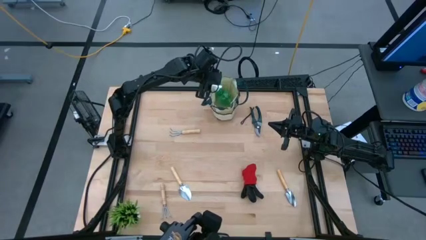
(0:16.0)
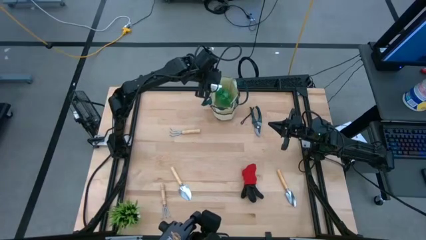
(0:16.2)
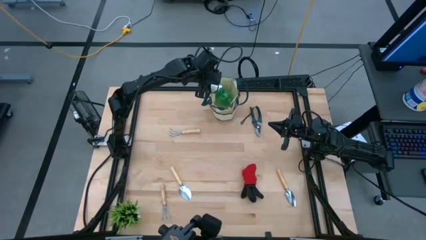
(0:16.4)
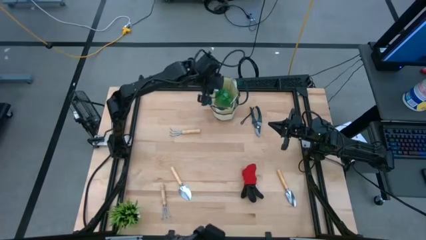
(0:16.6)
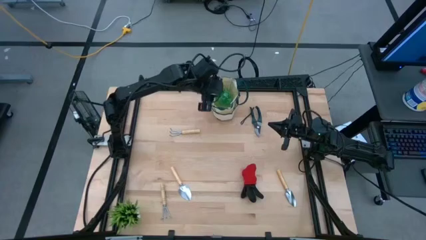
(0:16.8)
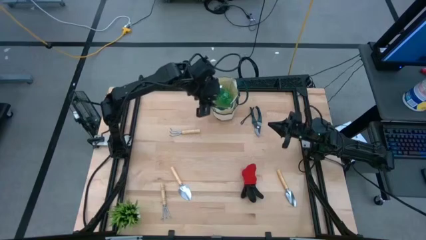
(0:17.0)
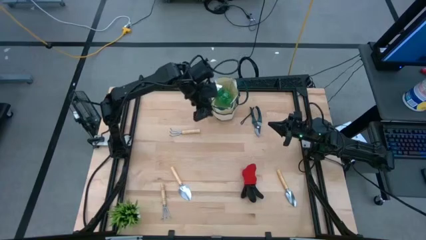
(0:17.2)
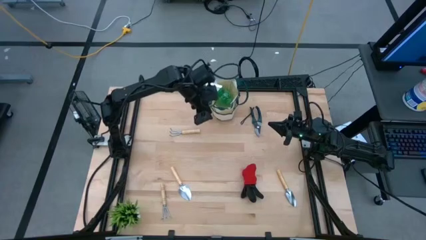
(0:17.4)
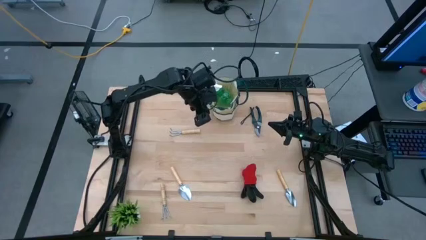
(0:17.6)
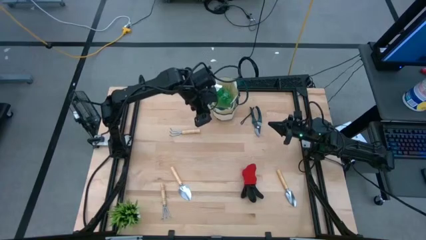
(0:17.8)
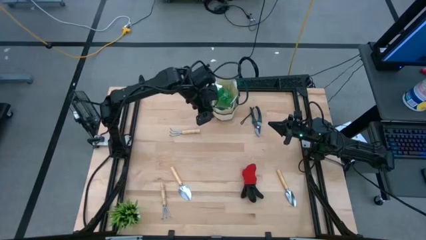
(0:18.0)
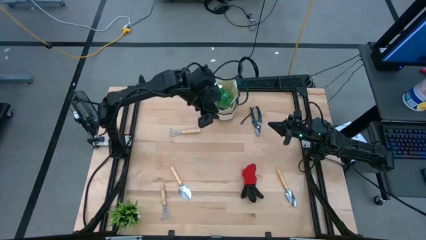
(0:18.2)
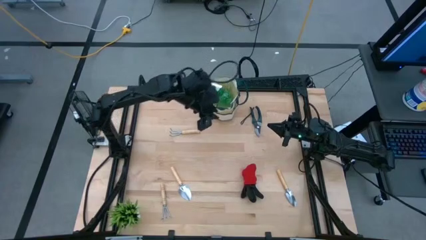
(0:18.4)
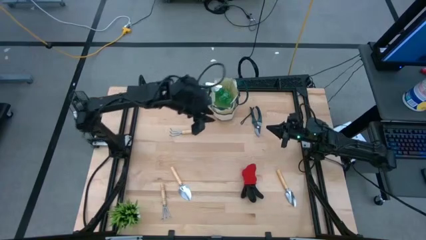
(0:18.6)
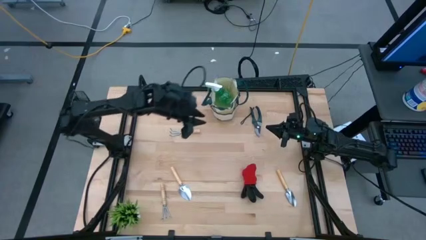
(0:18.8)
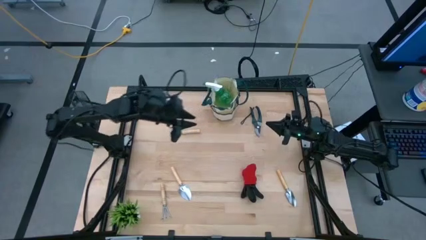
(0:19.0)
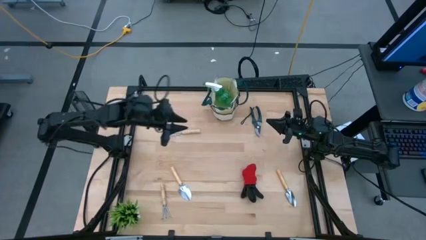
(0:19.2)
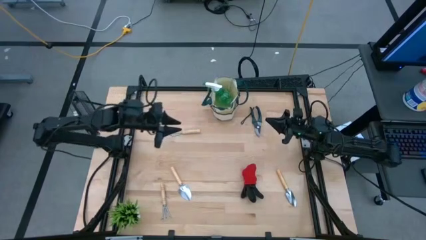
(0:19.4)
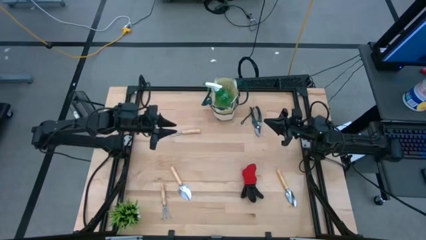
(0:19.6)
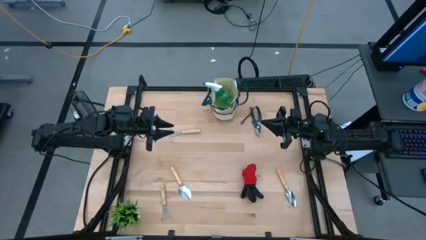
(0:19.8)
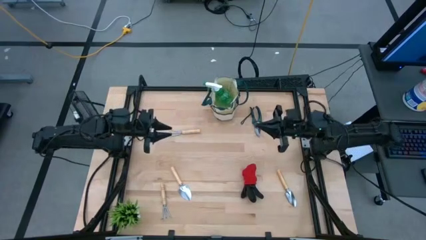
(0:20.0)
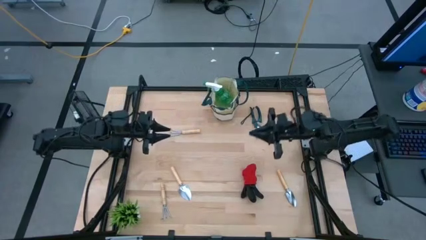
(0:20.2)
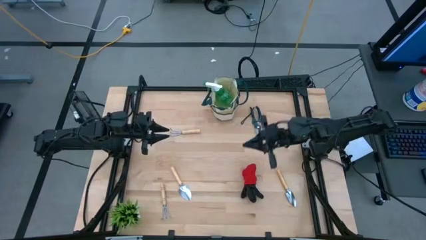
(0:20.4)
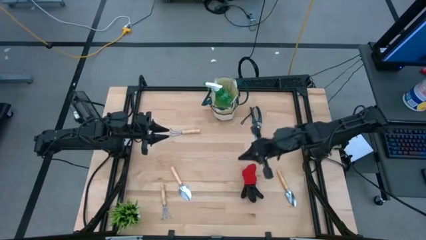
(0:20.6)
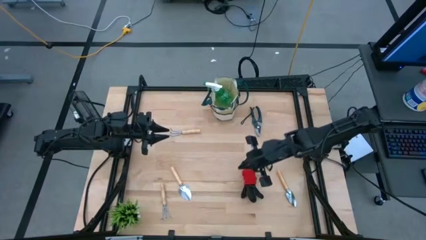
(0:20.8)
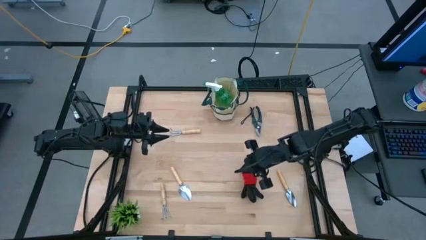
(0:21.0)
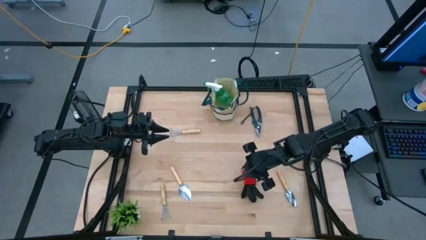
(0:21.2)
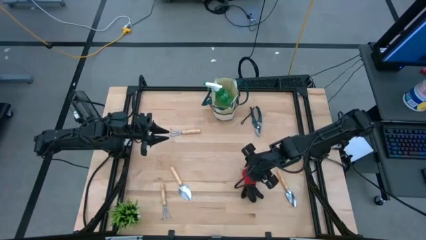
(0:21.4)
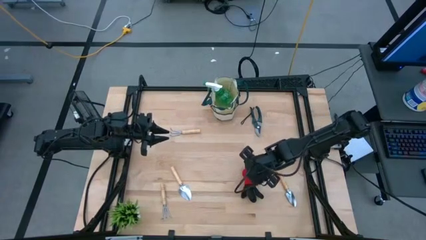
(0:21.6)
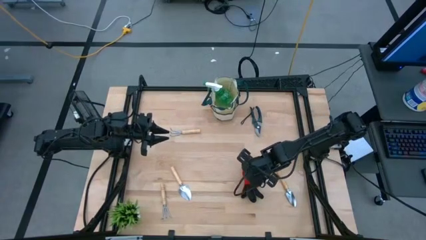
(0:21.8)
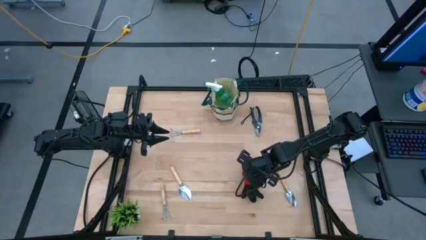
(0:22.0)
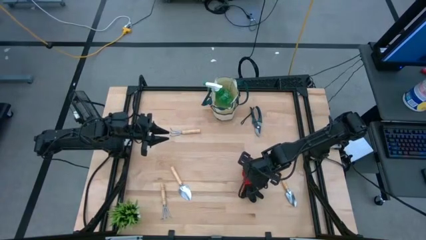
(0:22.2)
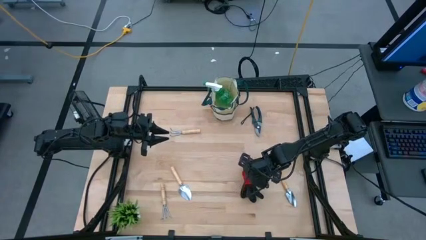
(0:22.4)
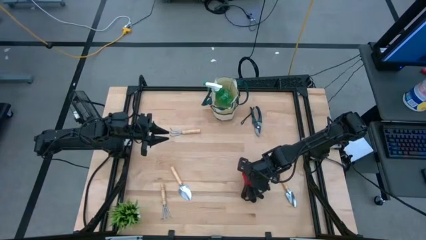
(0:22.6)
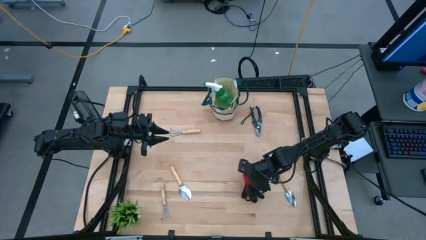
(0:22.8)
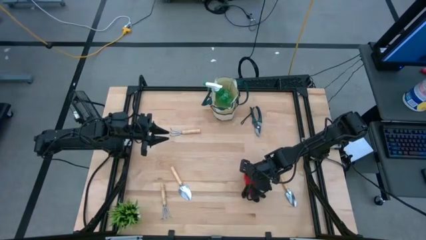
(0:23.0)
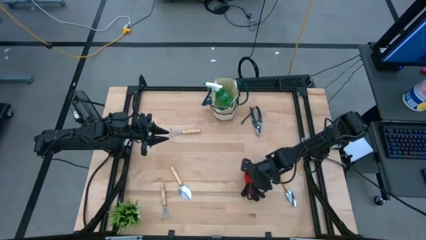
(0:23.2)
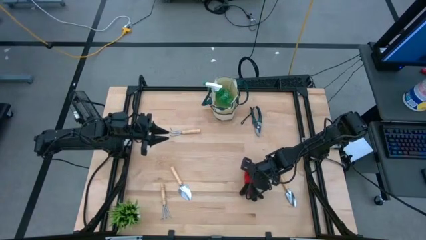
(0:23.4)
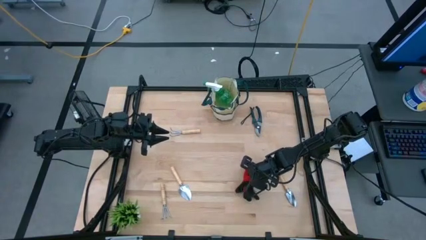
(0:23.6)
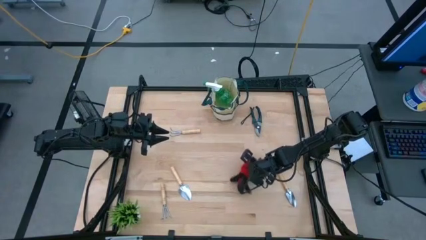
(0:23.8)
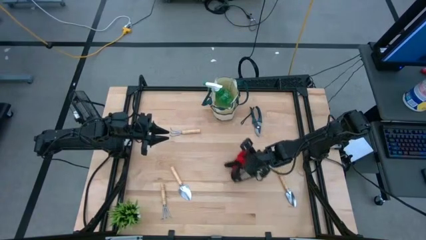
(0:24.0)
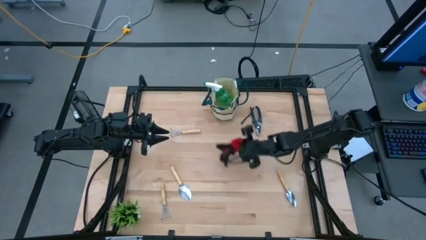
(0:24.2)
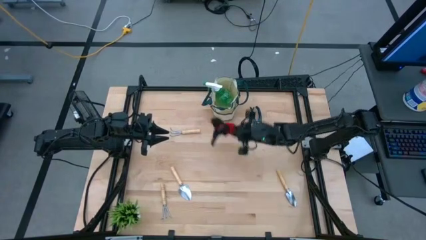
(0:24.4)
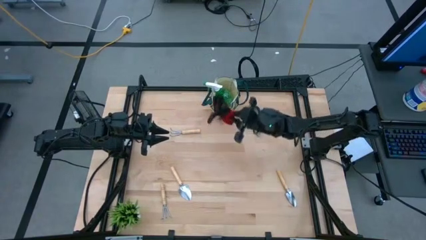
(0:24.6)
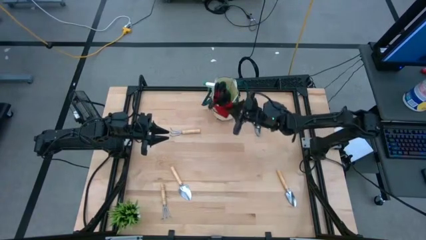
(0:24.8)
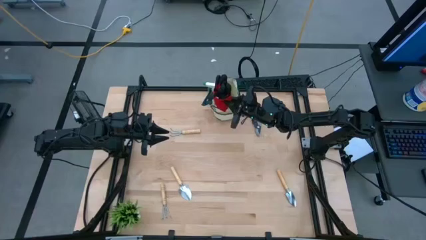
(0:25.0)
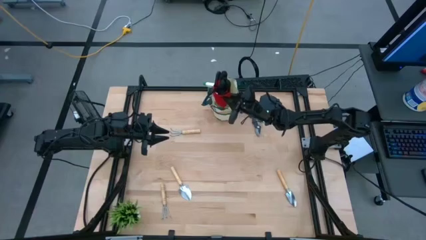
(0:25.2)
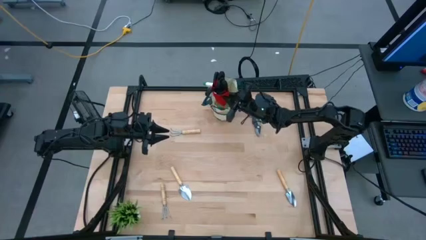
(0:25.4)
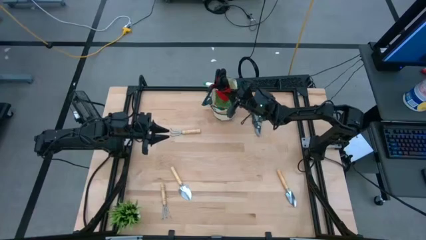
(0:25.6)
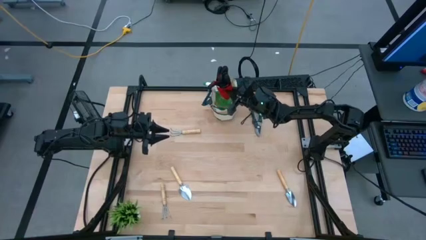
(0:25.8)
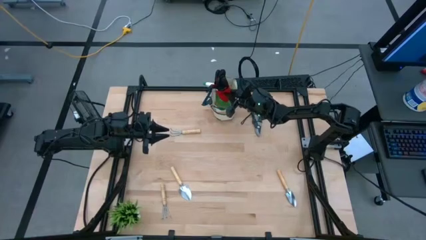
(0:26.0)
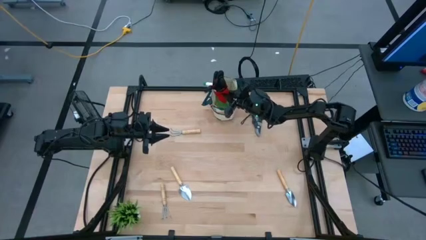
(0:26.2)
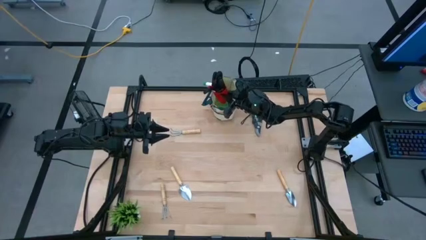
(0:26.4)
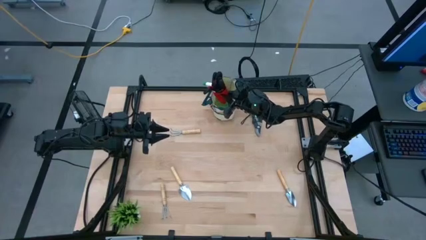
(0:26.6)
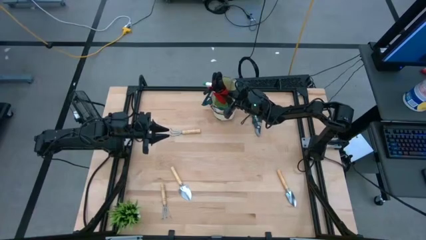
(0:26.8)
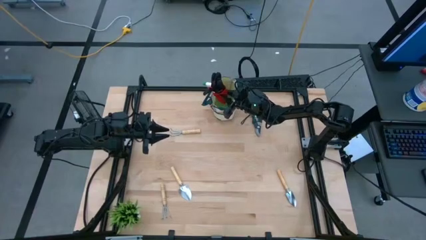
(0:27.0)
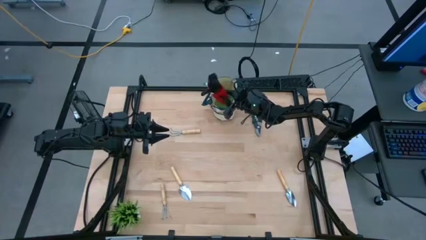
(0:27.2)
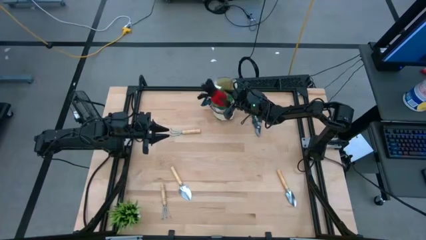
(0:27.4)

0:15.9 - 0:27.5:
Task: Pick & Place Garden tools in Gardening bag
Put the gloves into the the gardening bag

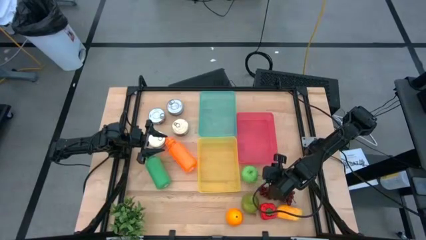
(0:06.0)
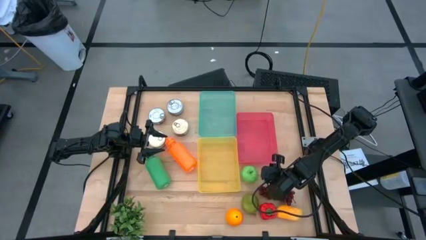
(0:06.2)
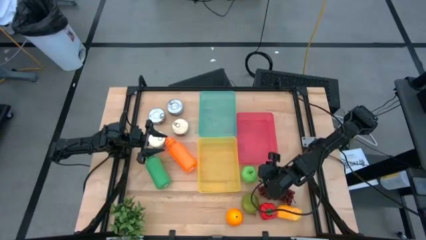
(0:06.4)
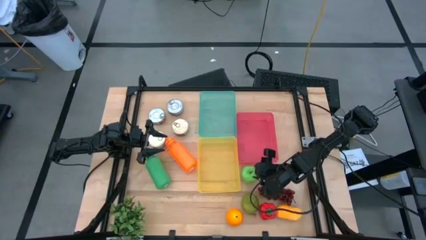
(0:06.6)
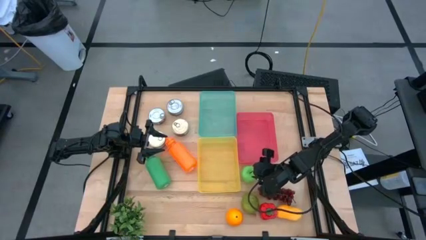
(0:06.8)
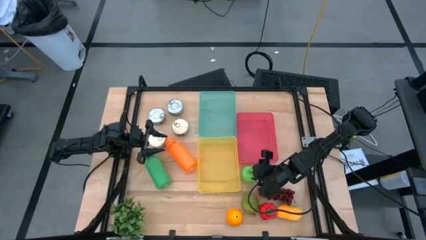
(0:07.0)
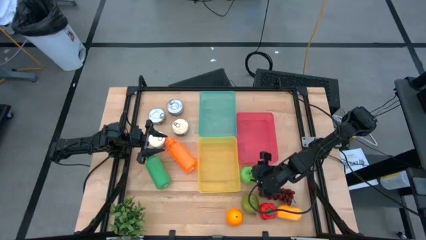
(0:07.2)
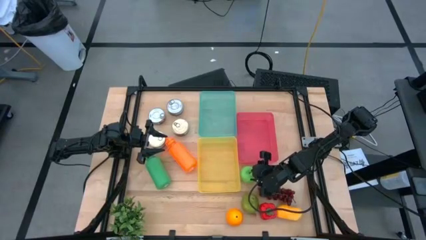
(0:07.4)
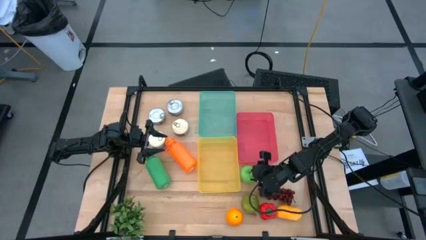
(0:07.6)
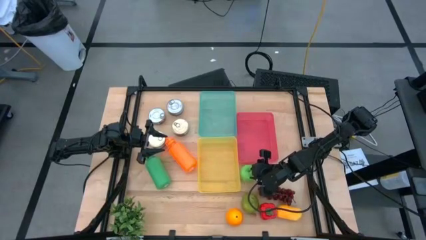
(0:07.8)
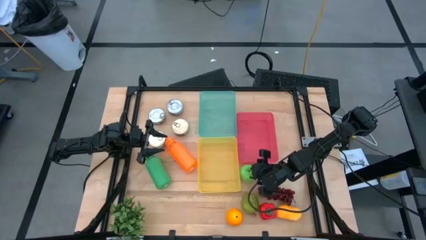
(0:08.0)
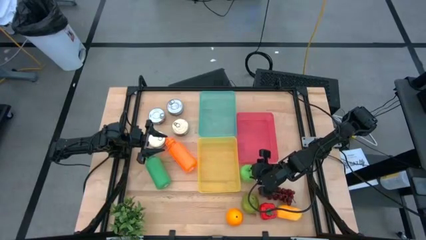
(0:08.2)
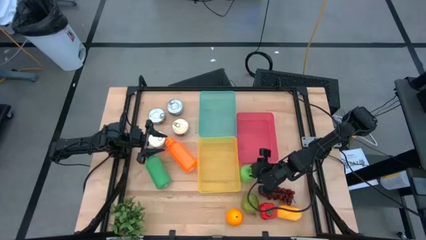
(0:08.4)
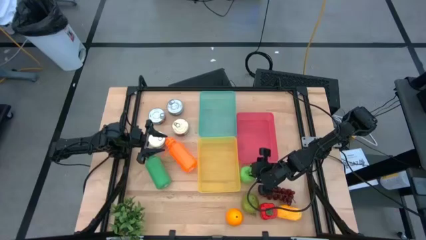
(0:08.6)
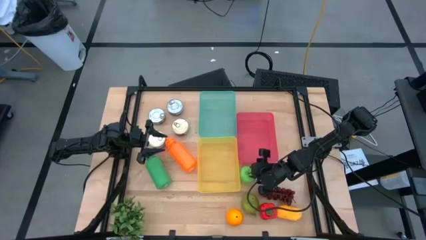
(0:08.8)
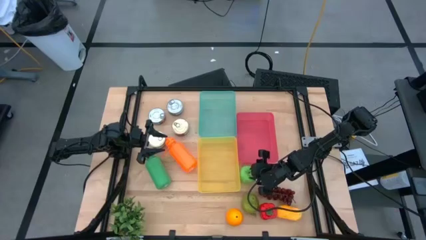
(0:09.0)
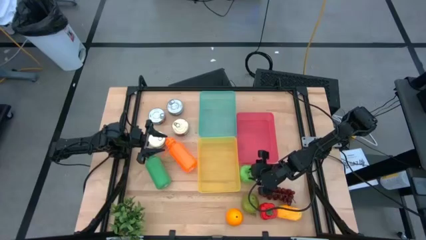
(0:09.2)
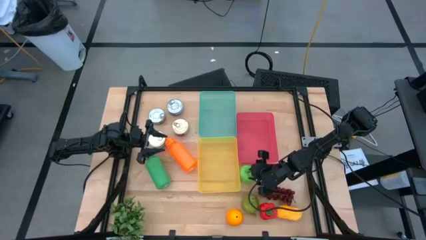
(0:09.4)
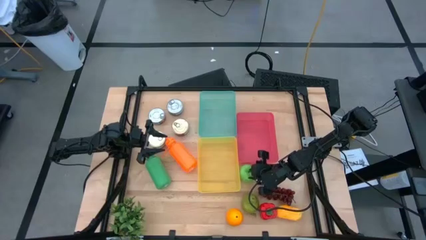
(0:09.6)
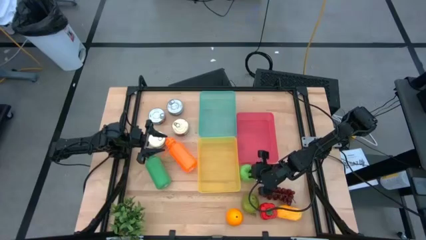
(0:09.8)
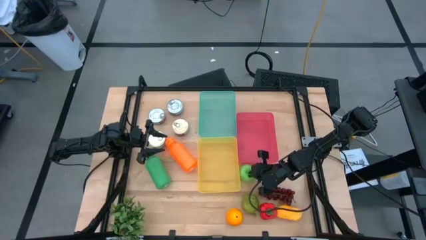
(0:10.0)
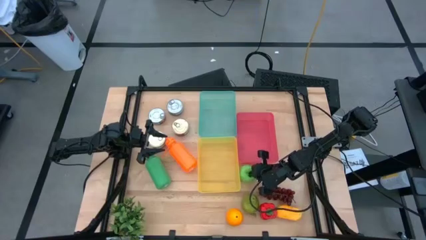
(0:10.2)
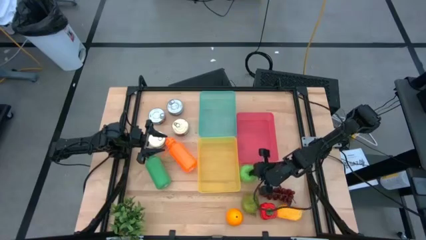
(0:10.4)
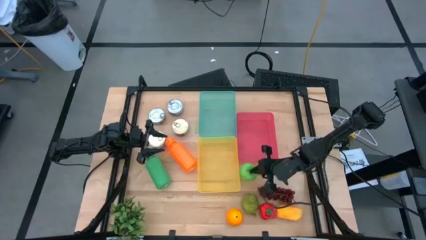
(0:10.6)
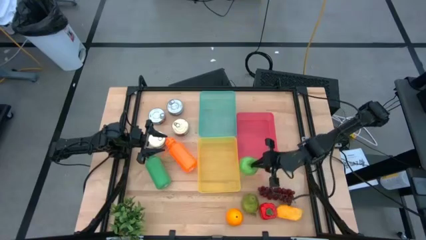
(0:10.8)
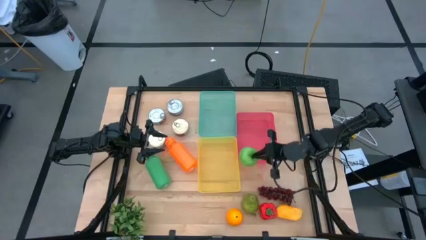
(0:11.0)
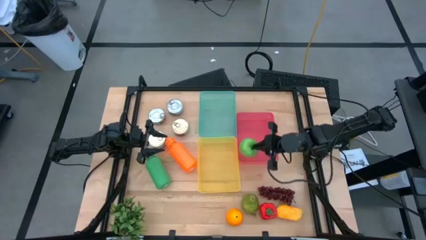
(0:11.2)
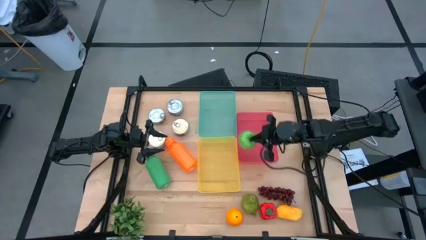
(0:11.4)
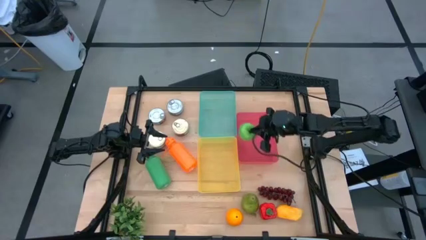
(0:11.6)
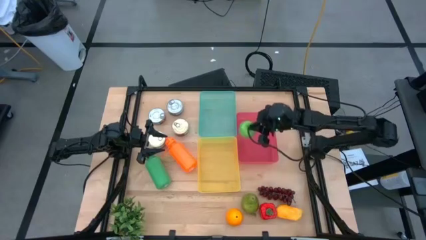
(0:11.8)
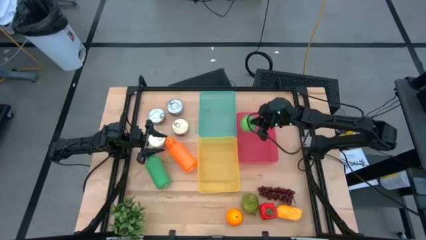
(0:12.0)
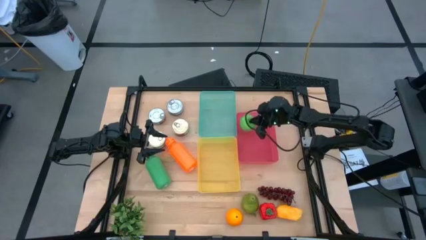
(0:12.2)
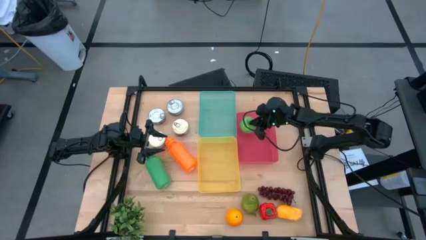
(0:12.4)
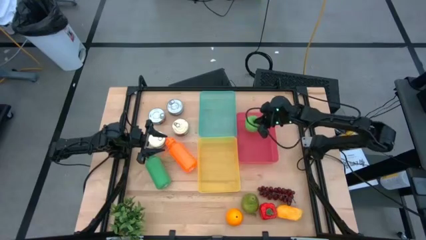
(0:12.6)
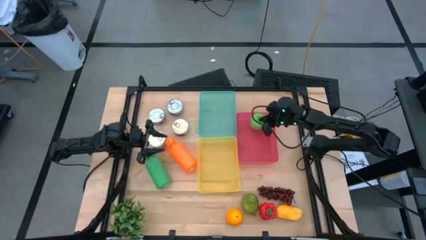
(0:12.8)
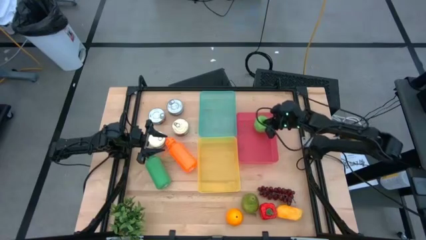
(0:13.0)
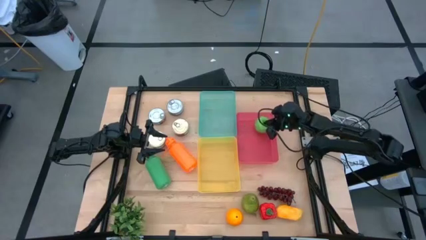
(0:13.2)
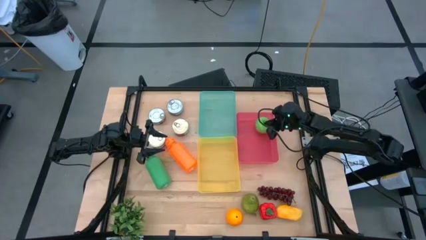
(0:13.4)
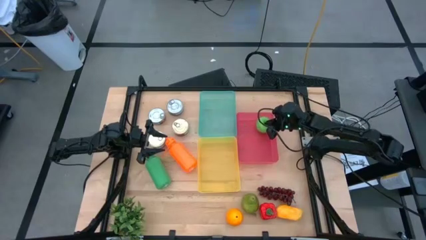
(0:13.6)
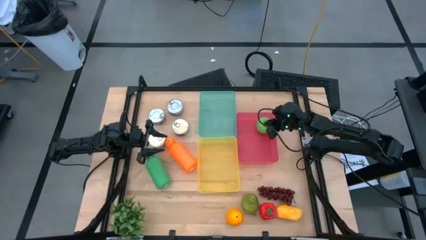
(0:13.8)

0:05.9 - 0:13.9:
Task: Pick & Place Food Item
Put the green apple into the red bin
